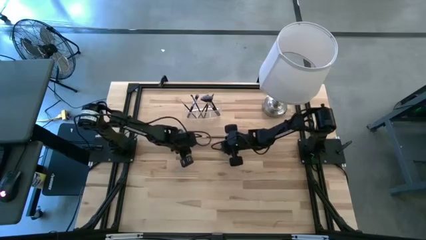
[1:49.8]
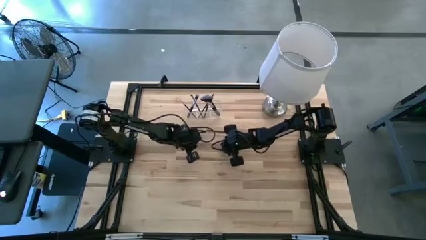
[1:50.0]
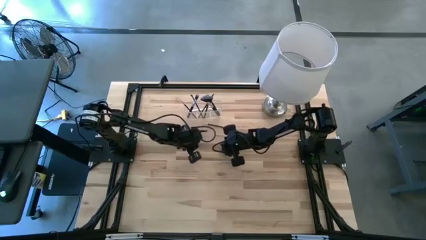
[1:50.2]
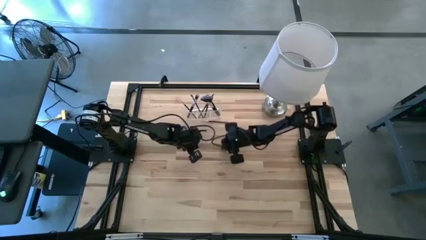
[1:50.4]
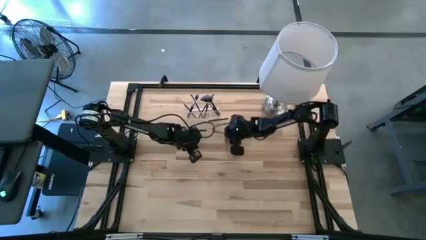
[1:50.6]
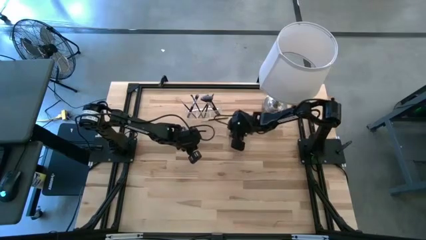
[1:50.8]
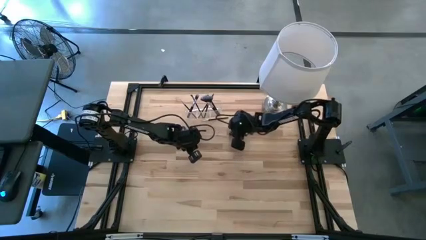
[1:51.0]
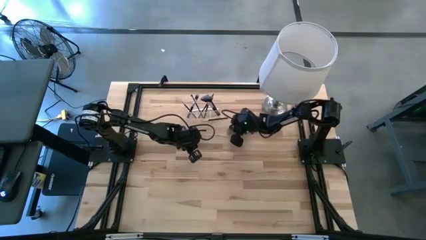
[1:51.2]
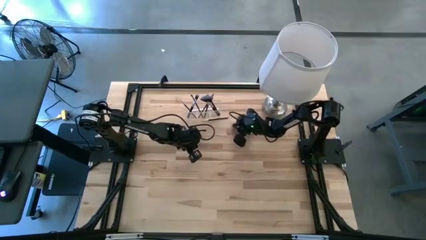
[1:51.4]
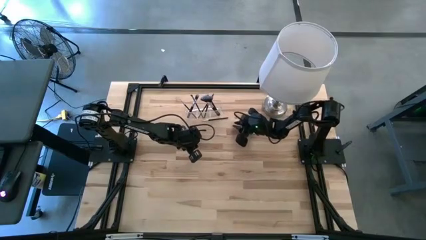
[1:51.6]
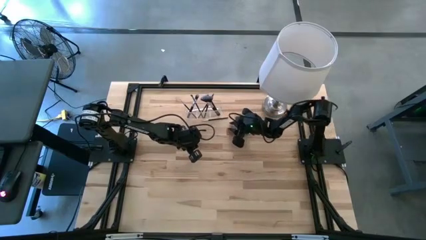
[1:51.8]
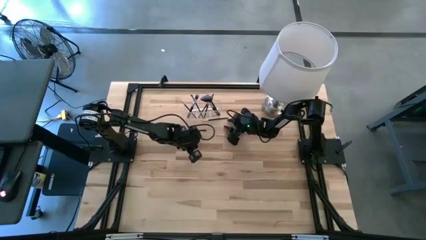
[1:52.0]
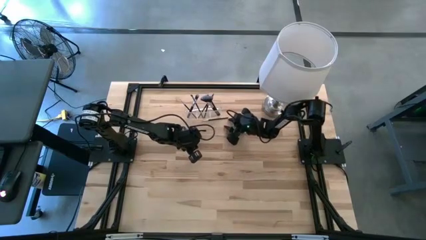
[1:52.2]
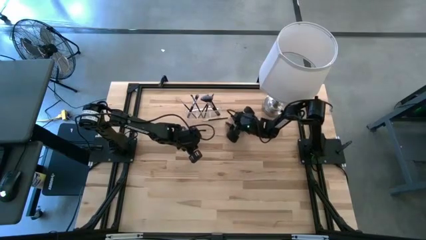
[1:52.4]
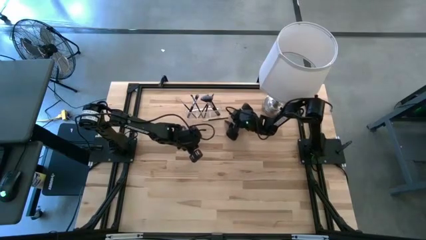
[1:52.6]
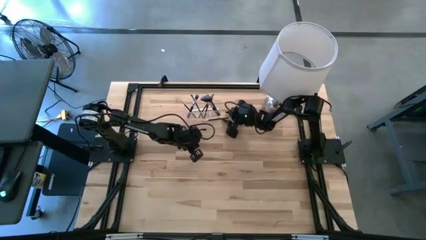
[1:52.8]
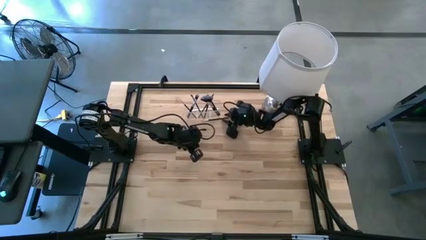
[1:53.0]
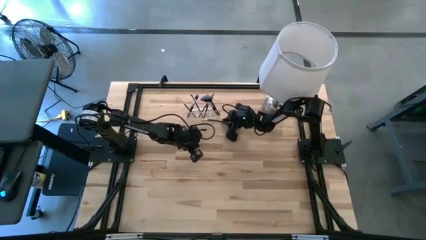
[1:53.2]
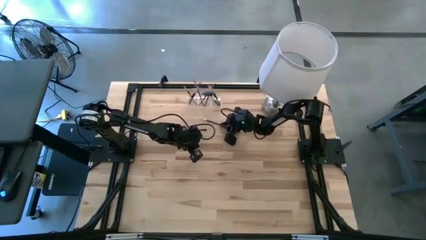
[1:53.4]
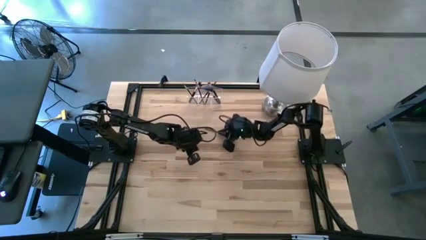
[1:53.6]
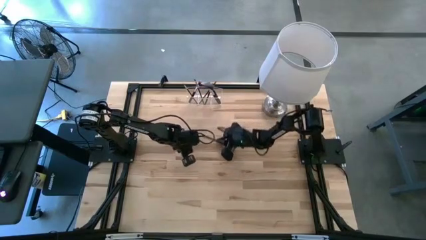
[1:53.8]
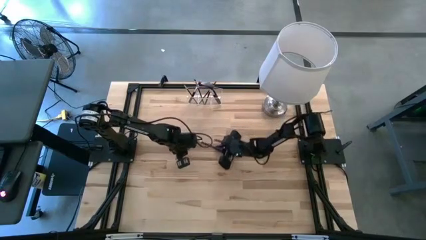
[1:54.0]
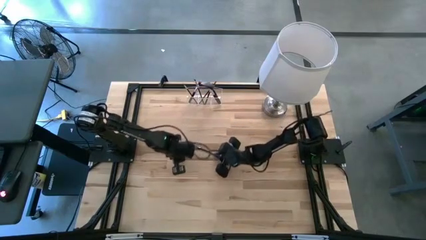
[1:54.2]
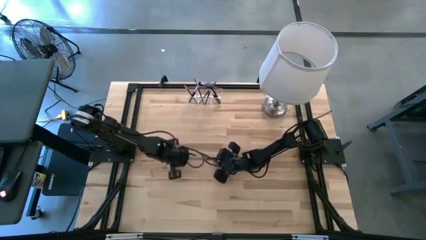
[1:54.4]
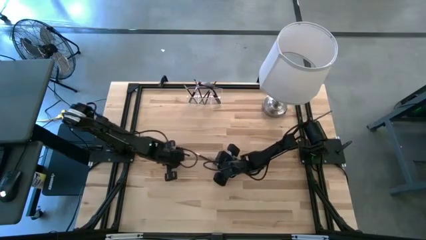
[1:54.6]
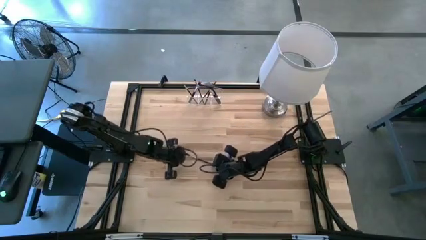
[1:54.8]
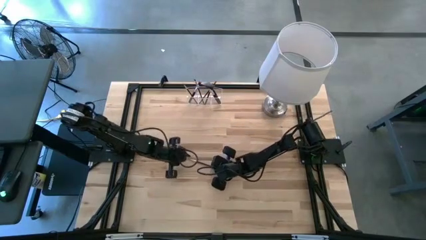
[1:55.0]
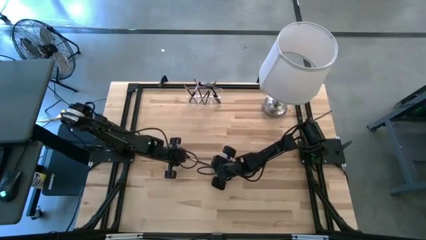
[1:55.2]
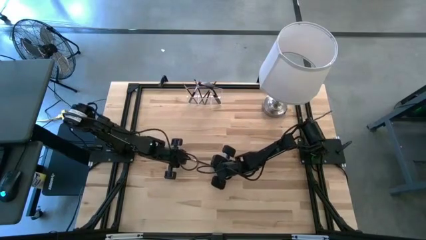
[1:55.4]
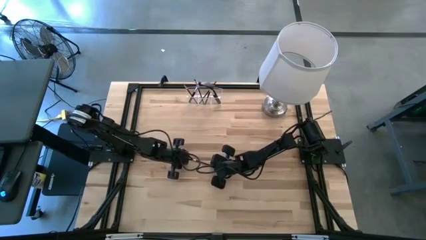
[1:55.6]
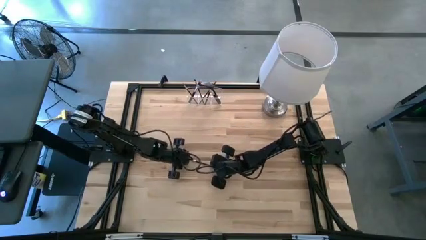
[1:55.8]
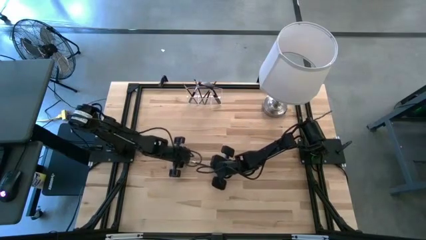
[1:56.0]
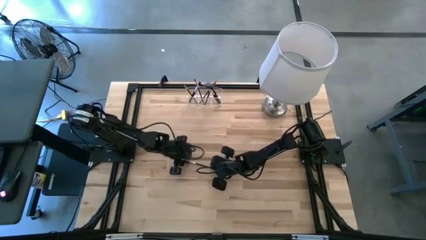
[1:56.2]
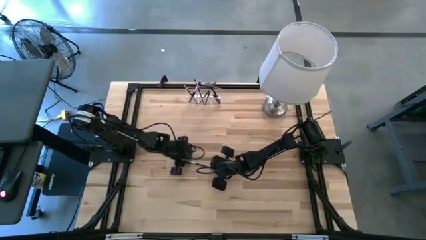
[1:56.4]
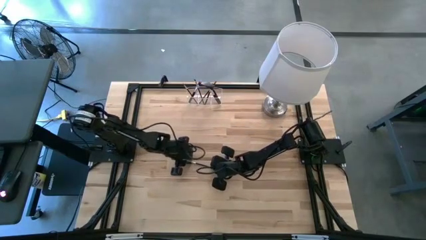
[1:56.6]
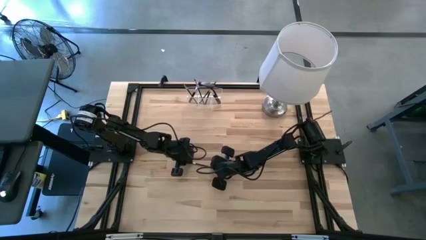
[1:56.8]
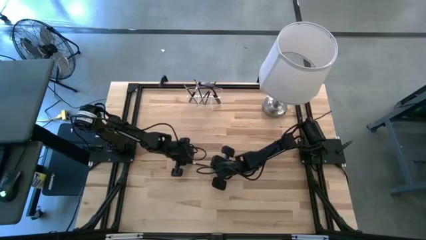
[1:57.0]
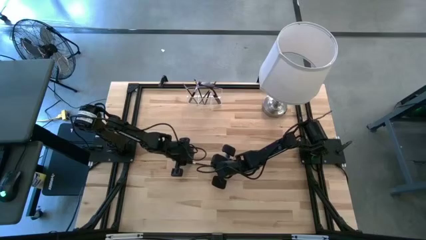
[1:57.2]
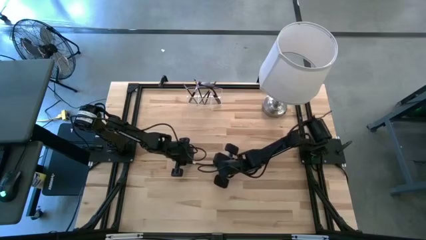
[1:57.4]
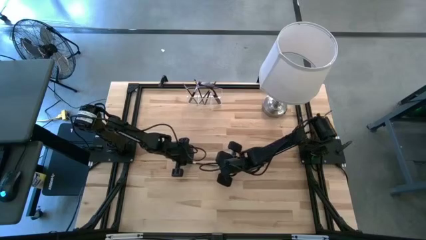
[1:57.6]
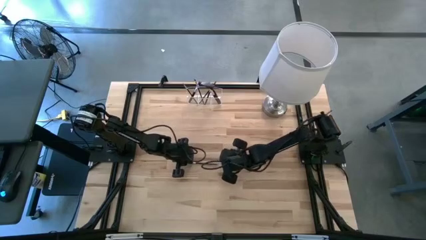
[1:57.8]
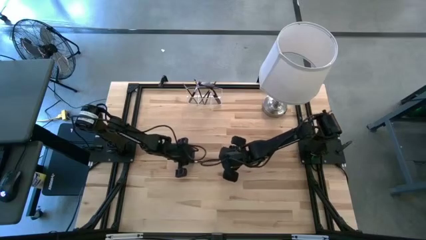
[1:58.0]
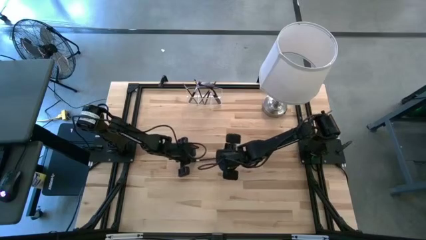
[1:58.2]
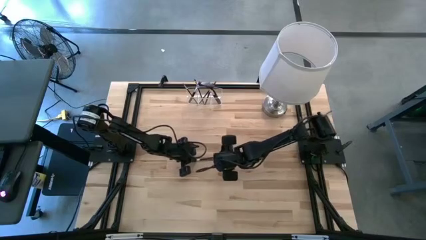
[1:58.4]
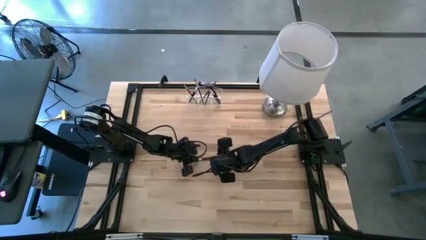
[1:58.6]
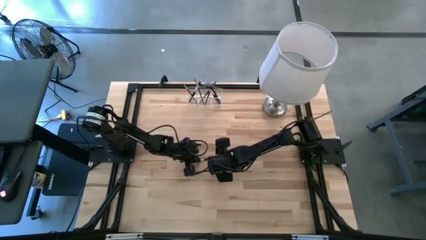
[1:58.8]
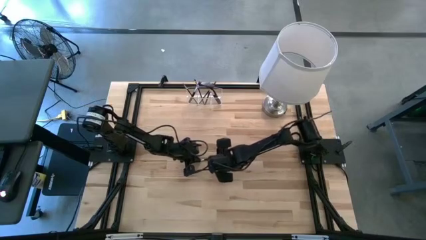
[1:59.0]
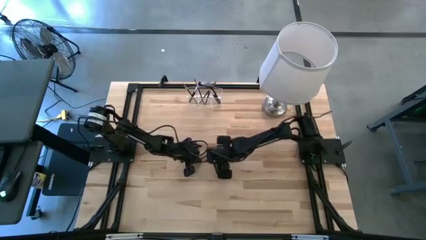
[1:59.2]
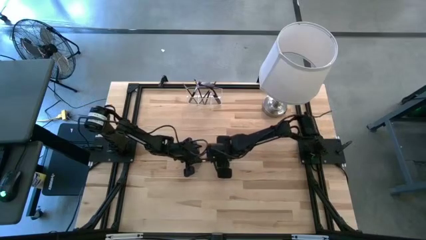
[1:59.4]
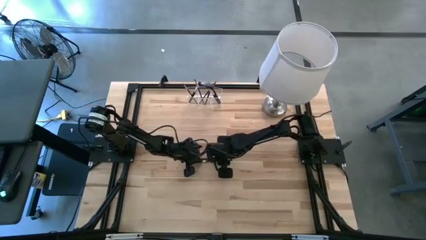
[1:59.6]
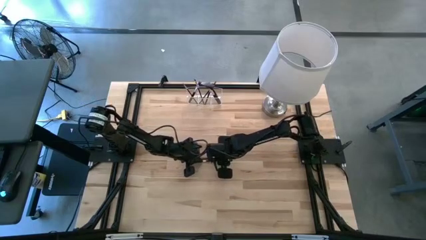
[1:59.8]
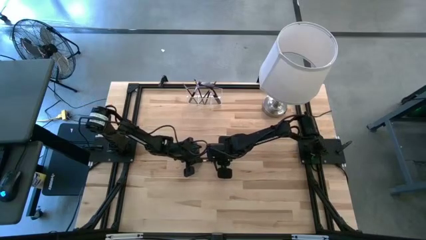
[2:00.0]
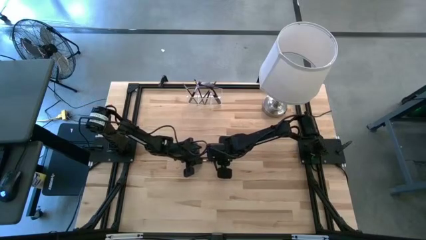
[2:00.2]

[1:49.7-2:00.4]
Task: Put items in baskets/containers
Put the liner brush into the transparent organizer

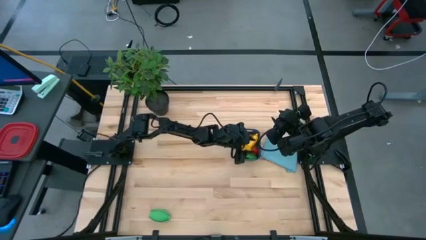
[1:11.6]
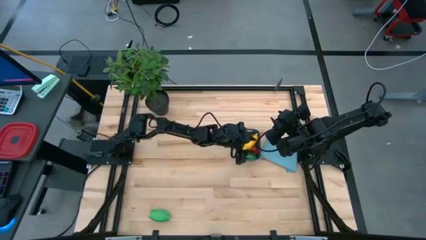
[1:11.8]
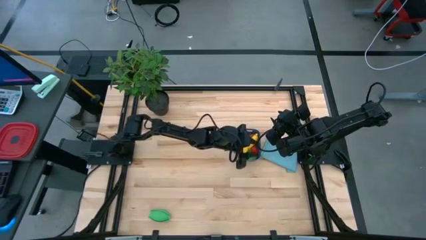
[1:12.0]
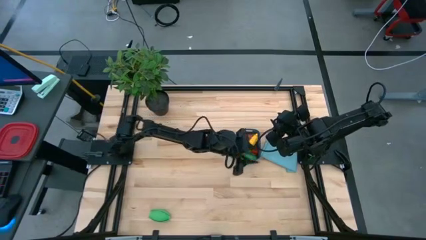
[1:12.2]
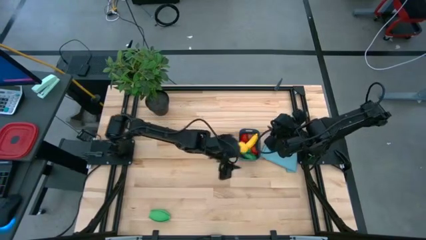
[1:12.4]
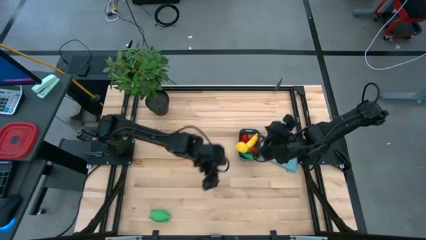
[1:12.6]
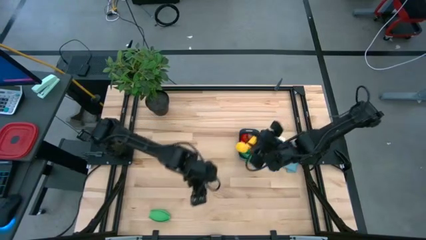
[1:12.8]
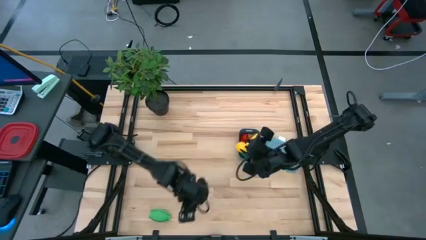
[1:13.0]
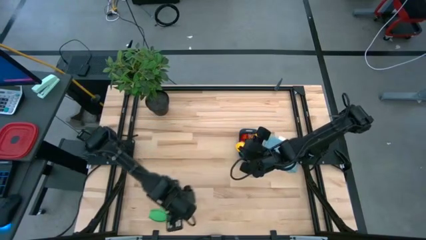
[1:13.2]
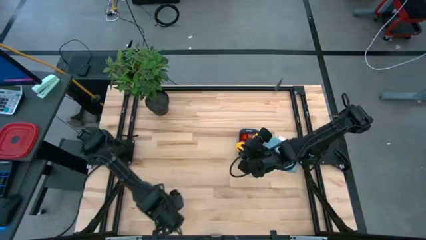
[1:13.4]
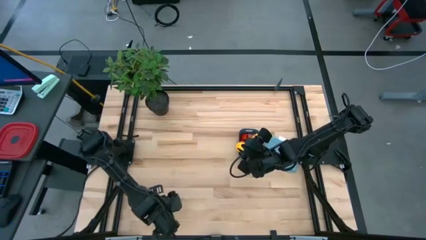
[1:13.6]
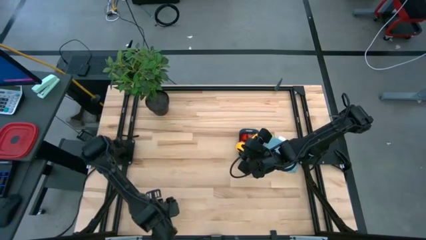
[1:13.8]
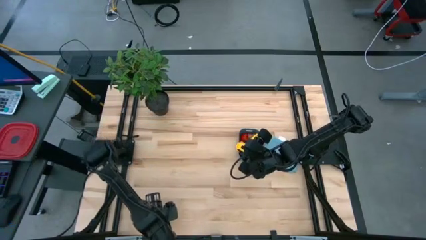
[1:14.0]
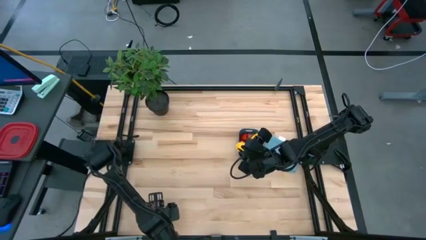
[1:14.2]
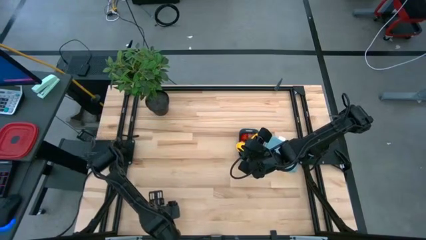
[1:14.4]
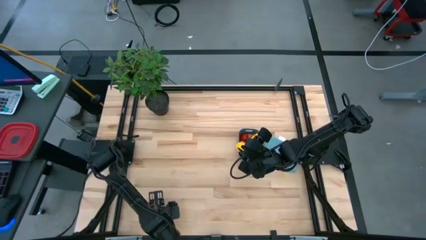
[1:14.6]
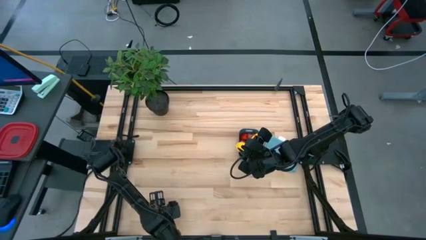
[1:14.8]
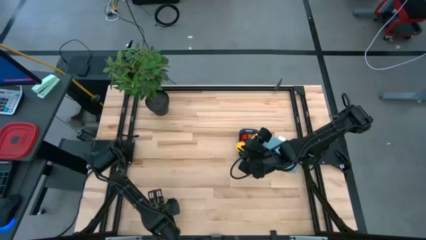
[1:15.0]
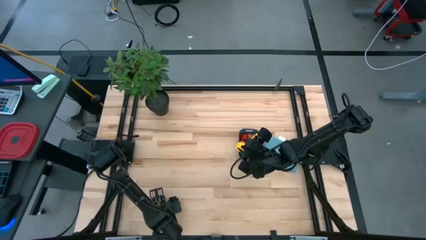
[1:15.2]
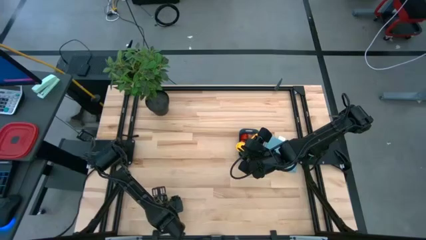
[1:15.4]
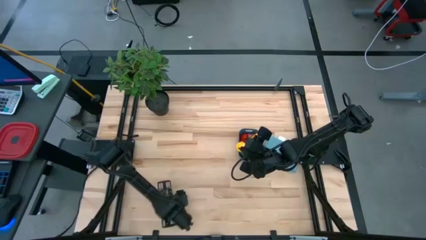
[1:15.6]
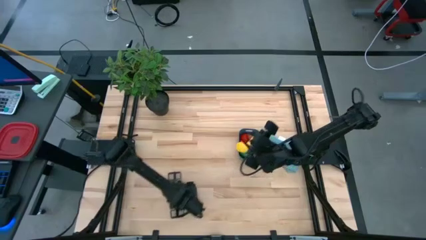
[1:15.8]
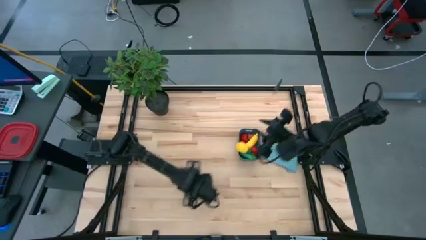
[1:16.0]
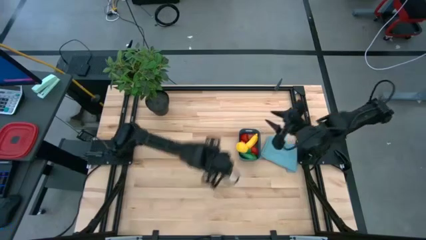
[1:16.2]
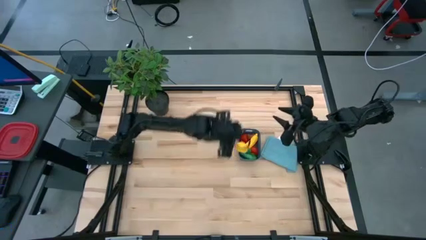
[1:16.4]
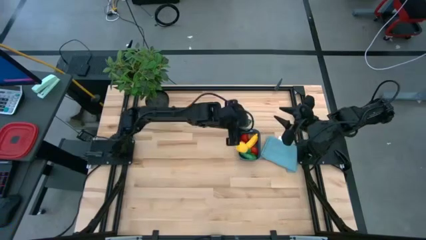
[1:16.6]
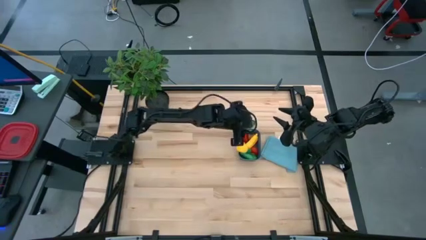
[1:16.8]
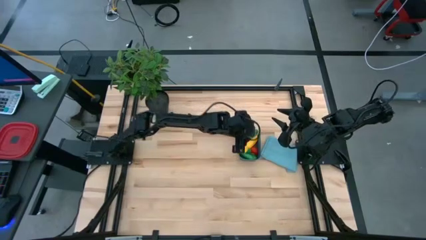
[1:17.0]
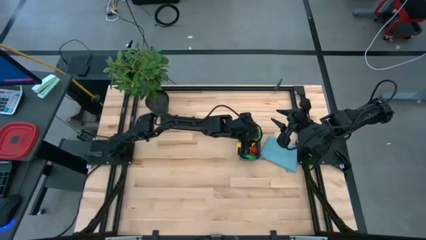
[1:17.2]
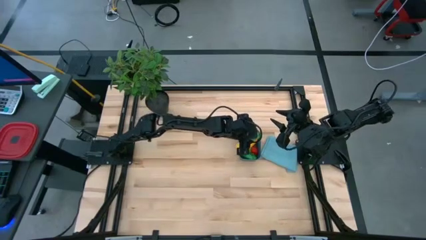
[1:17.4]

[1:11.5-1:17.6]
Task: Pick and placing Produce into tupperware
Put the green corn into the blue bin
